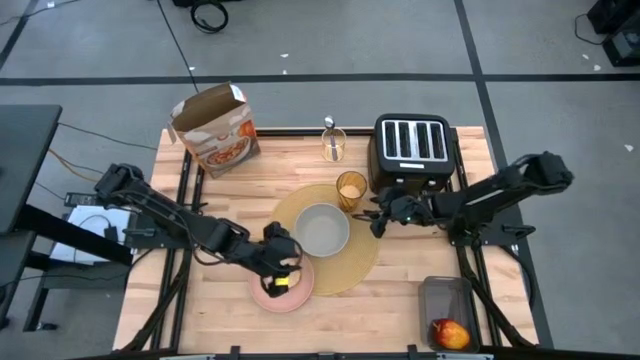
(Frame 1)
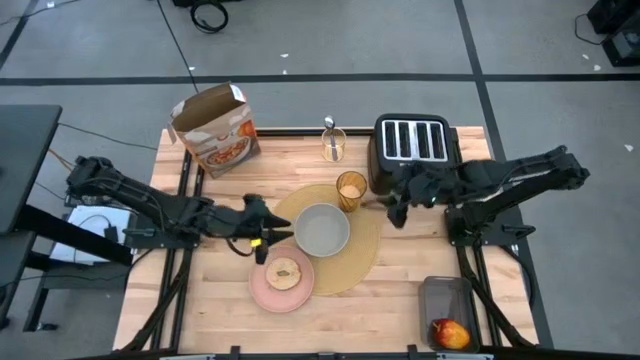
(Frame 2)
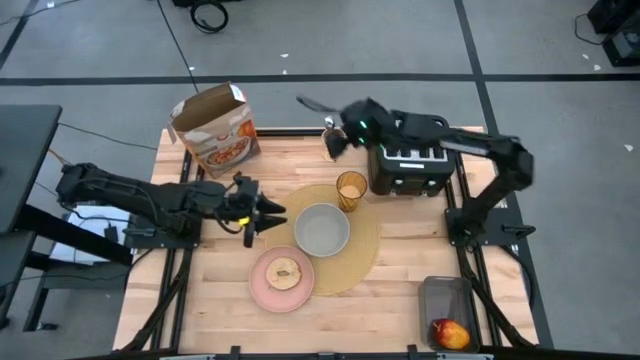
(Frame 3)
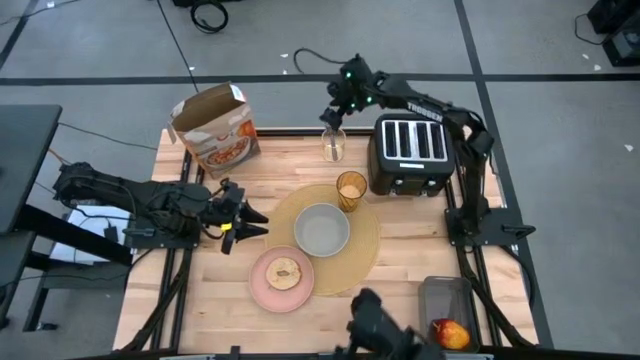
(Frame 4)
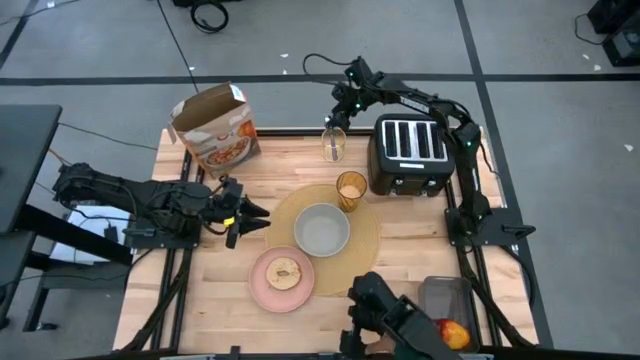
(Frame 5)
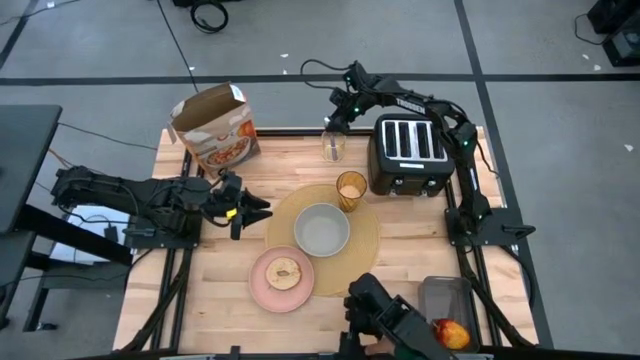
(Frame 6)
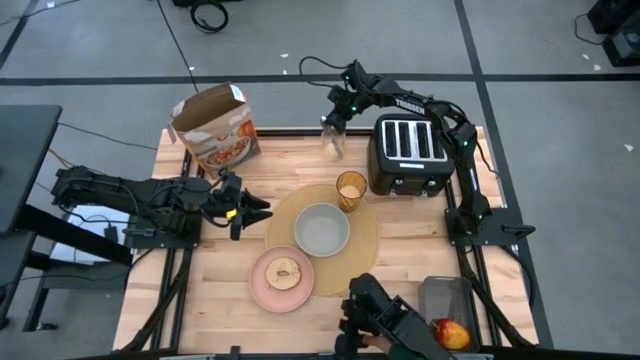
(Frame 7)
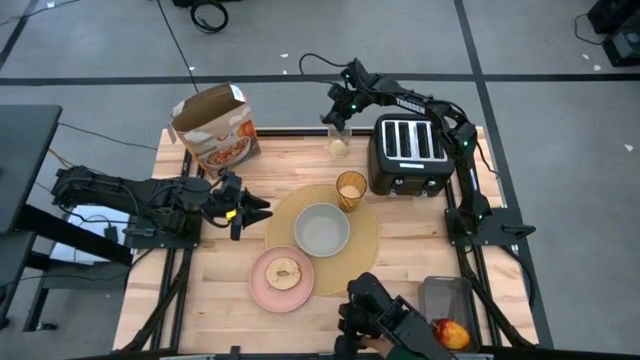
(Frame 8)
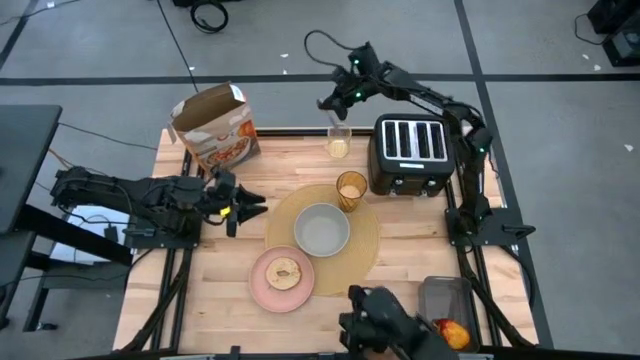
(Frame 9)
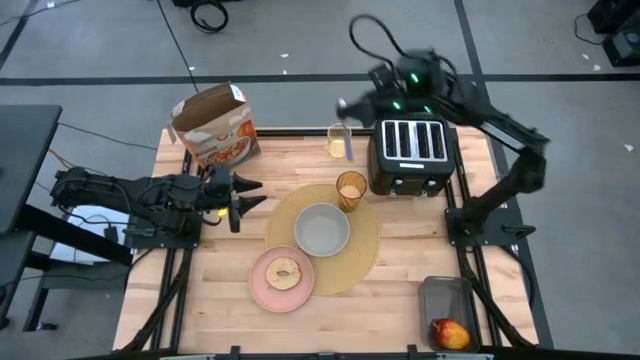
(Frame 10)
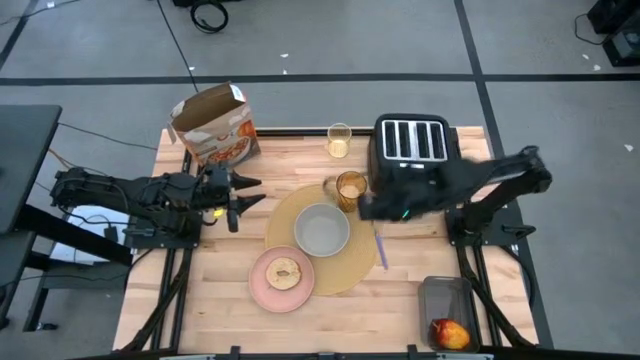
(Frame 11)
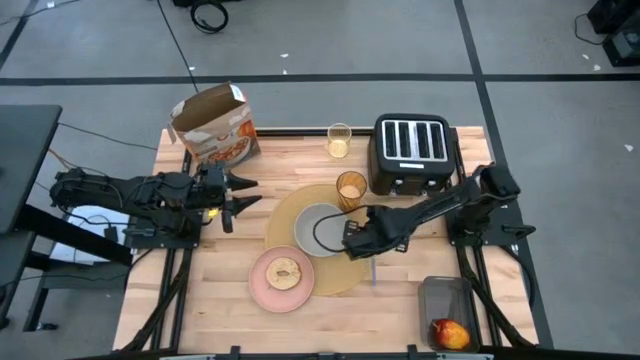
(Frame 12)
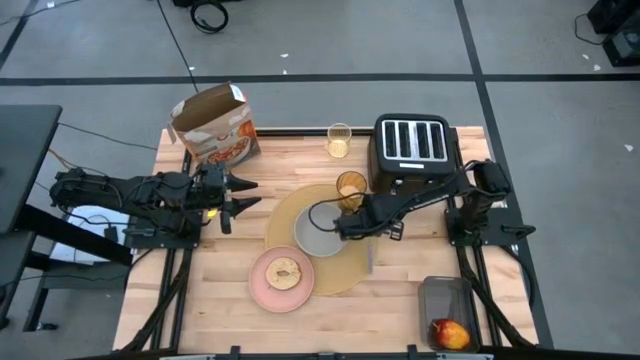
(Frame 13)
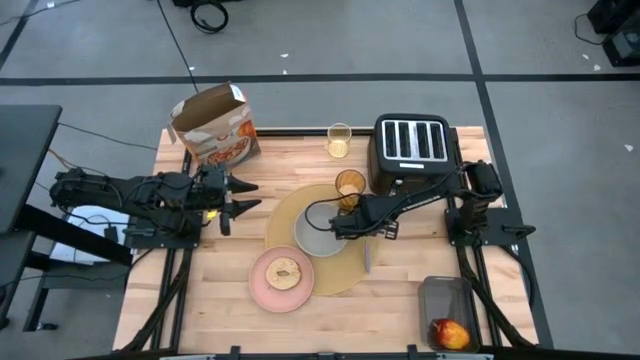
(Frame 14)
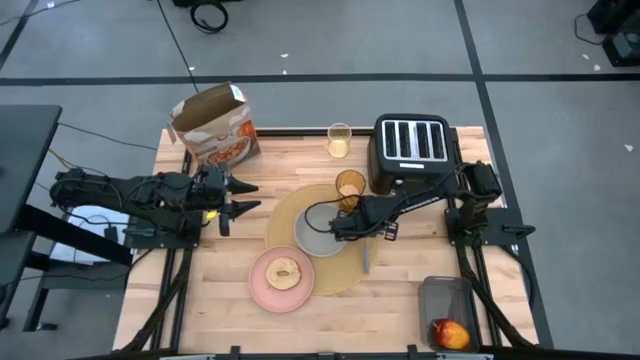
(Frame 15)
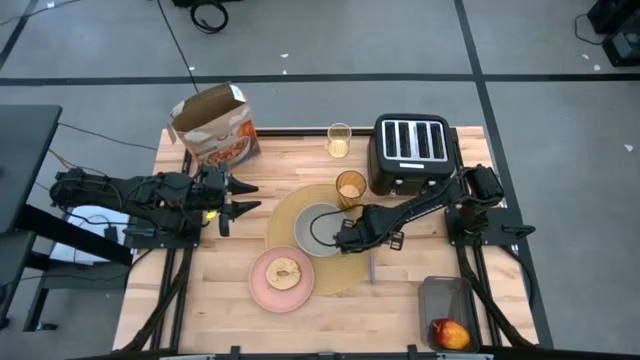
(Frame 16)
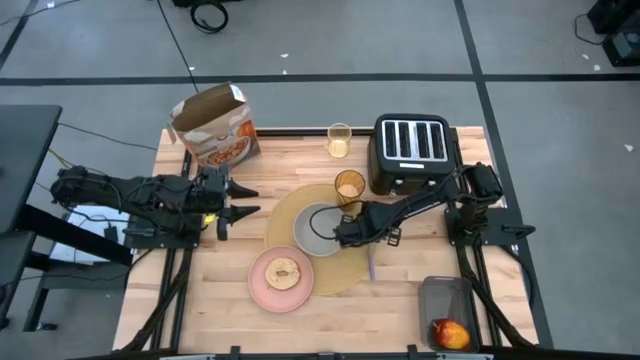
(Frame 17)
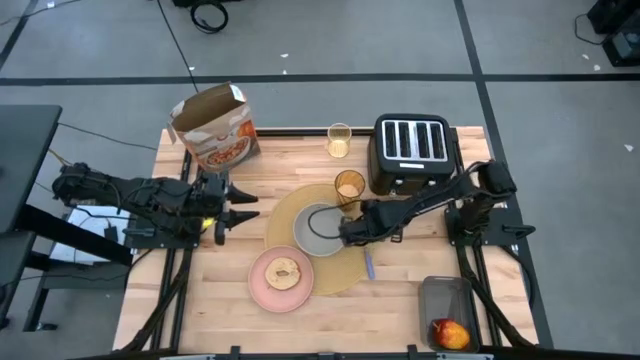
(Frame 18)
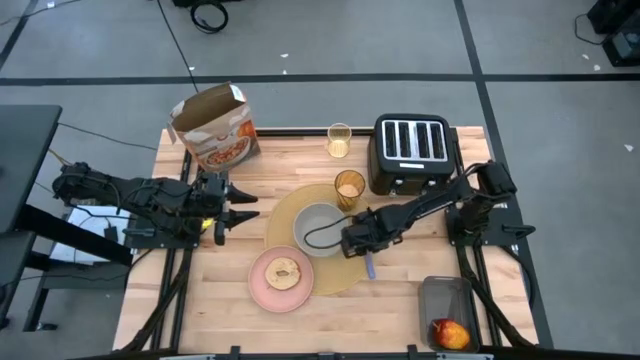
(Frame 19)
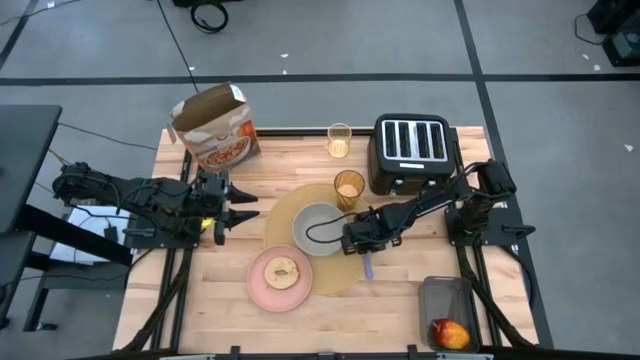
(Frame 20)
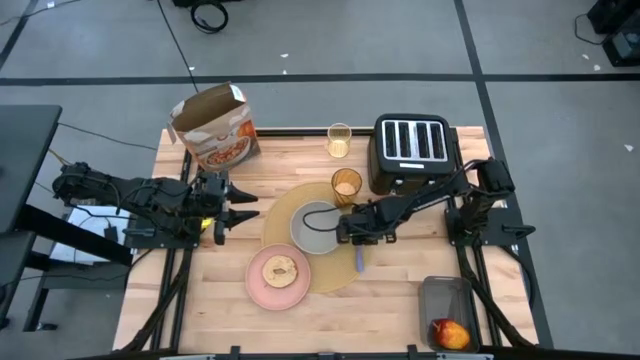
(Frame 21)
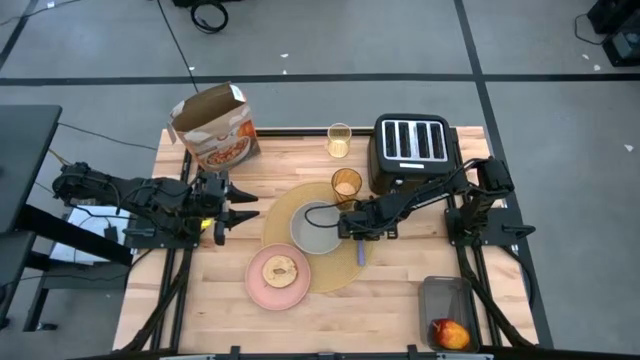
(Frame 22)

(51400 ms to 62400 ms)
Task: Arrange a breakfast setting
Put the violet spoon on the right of the gray bowl

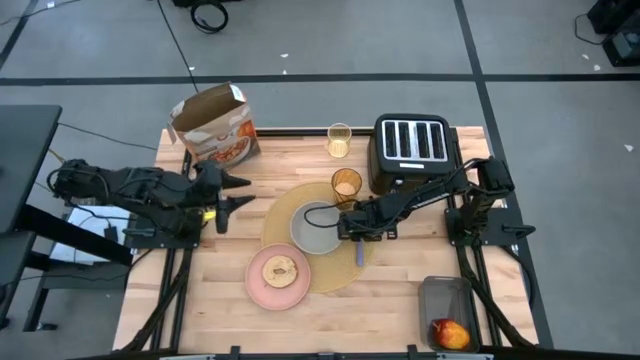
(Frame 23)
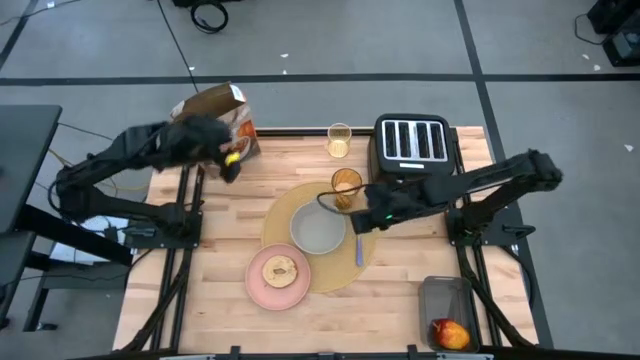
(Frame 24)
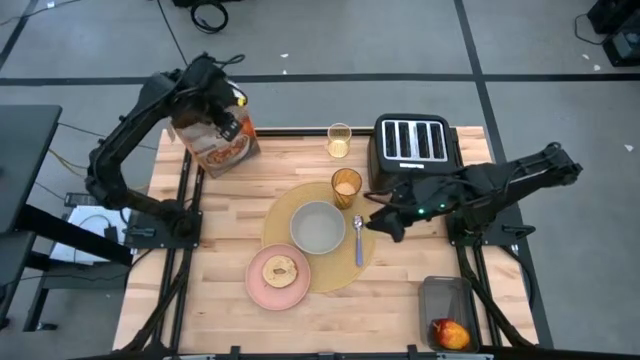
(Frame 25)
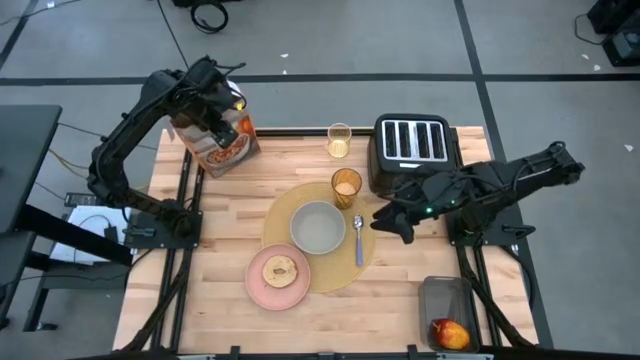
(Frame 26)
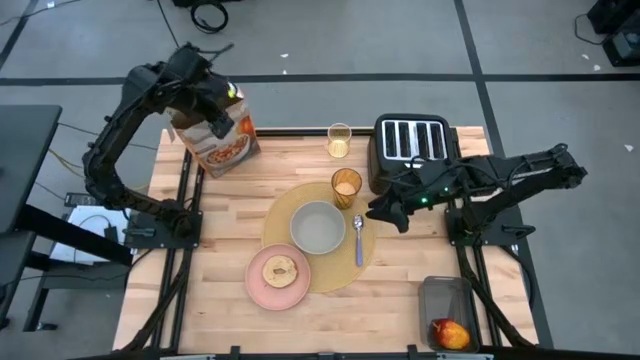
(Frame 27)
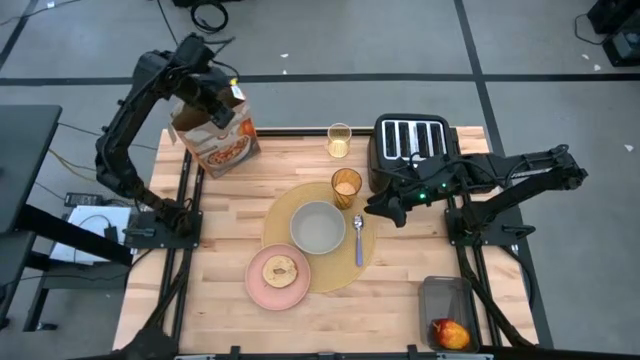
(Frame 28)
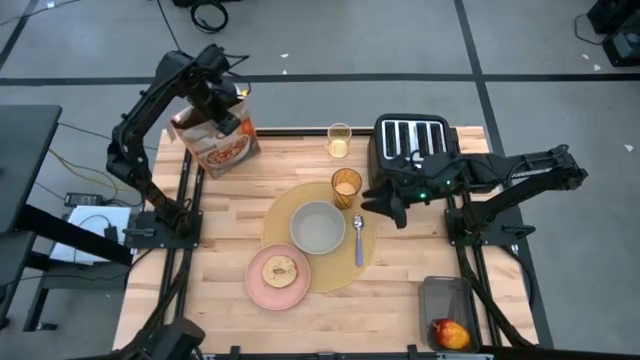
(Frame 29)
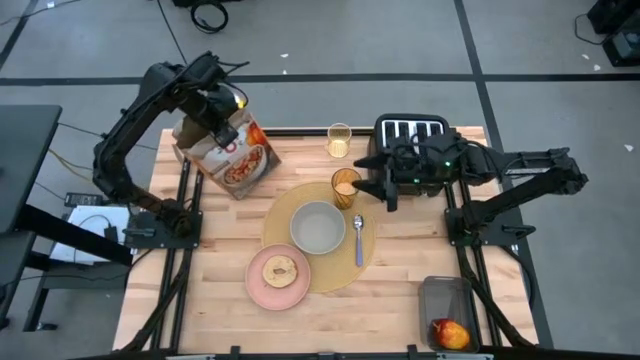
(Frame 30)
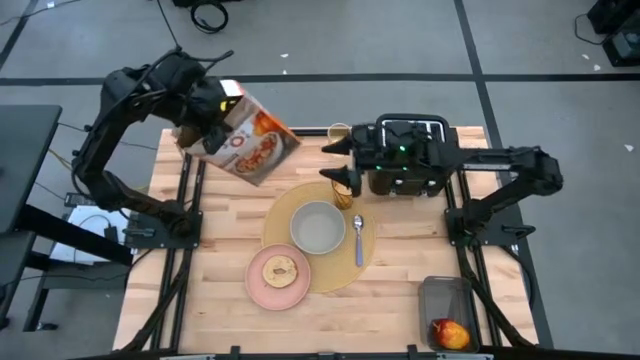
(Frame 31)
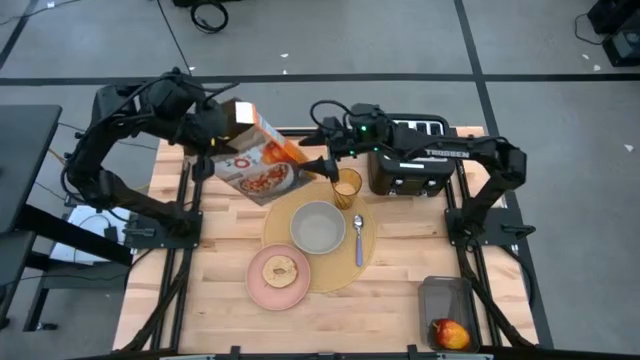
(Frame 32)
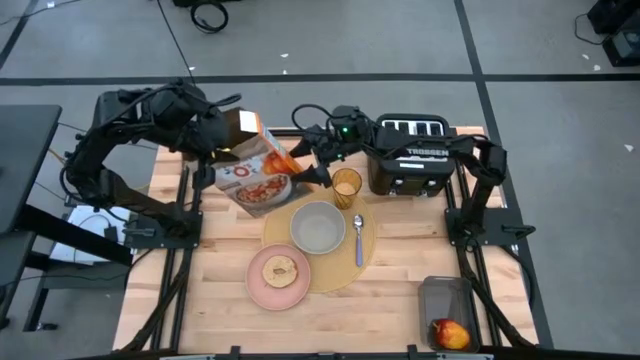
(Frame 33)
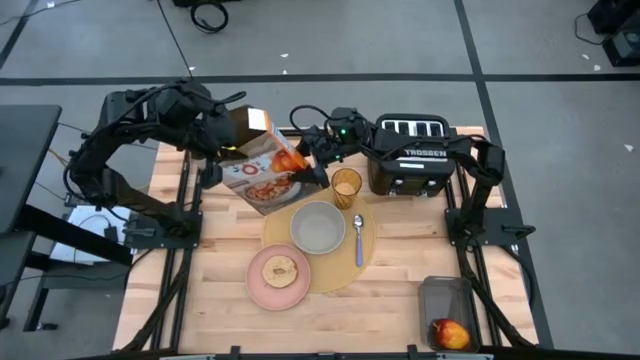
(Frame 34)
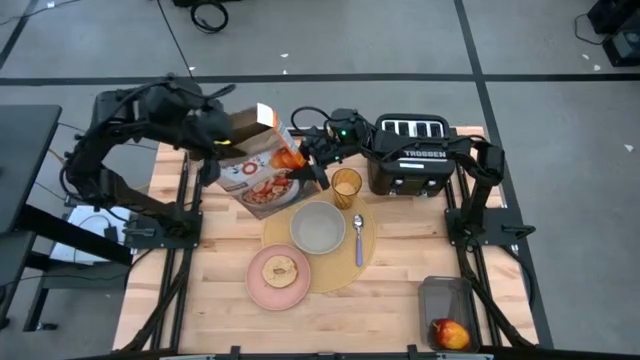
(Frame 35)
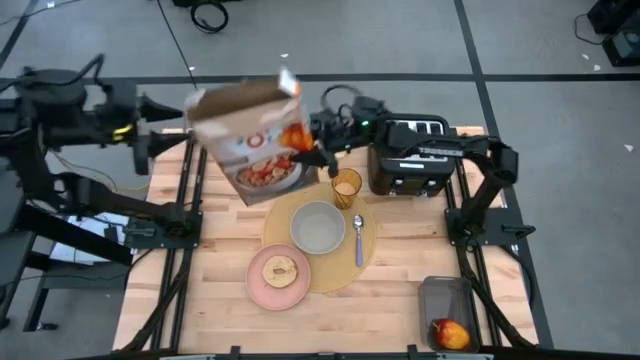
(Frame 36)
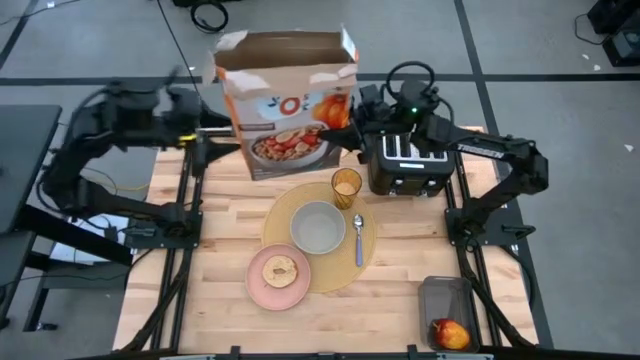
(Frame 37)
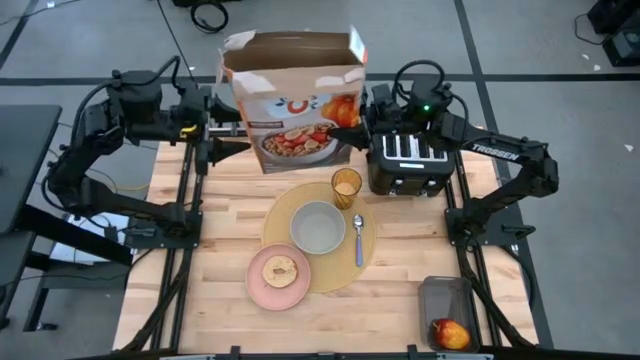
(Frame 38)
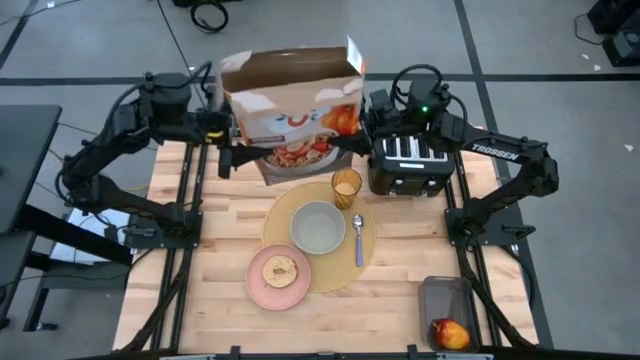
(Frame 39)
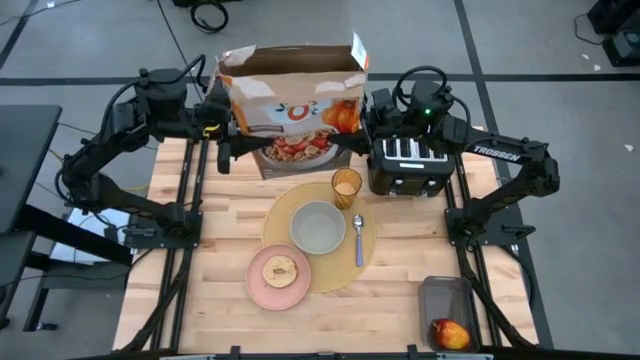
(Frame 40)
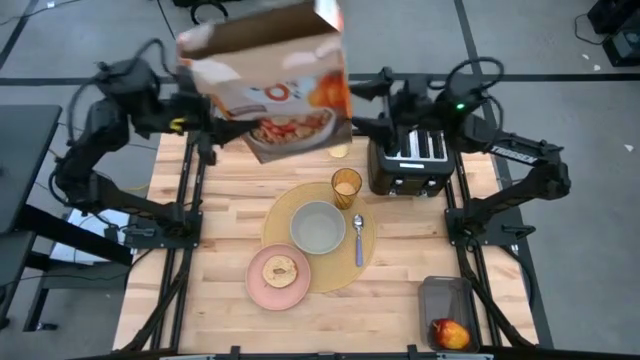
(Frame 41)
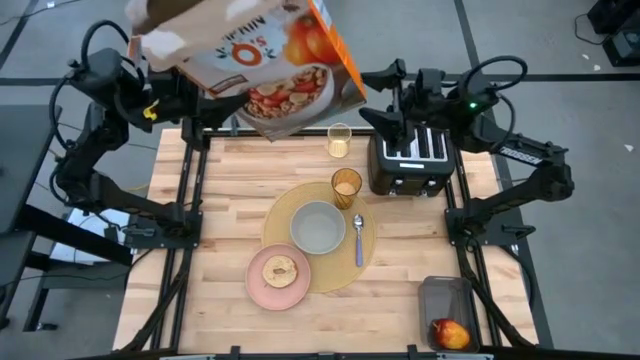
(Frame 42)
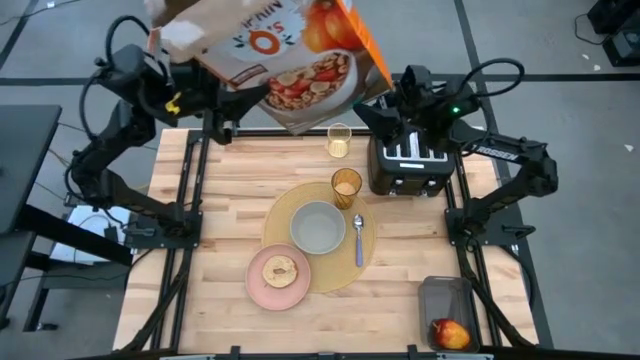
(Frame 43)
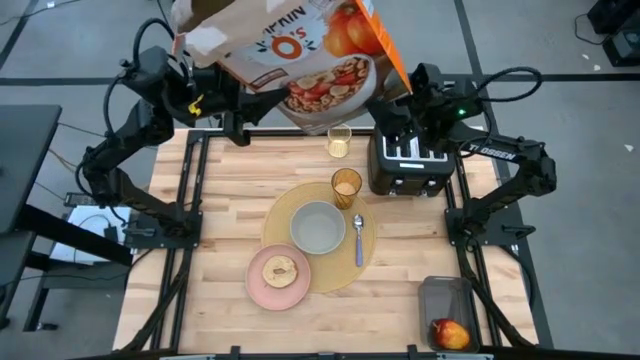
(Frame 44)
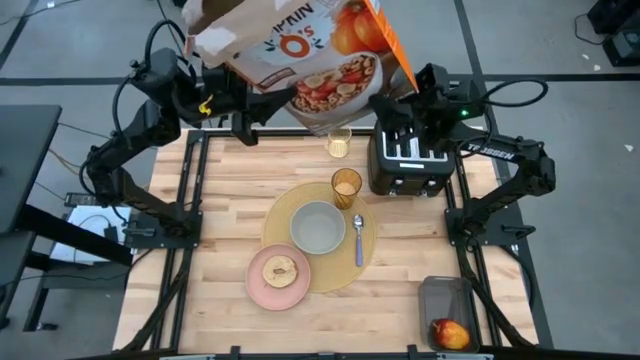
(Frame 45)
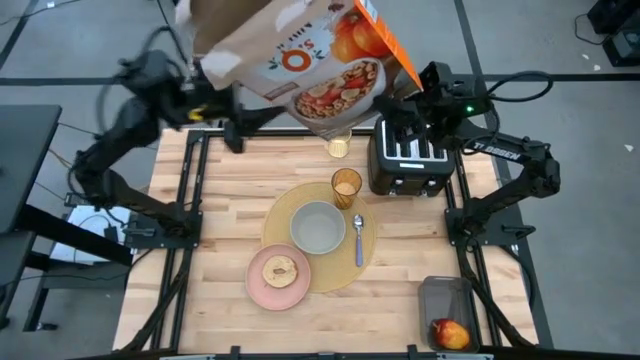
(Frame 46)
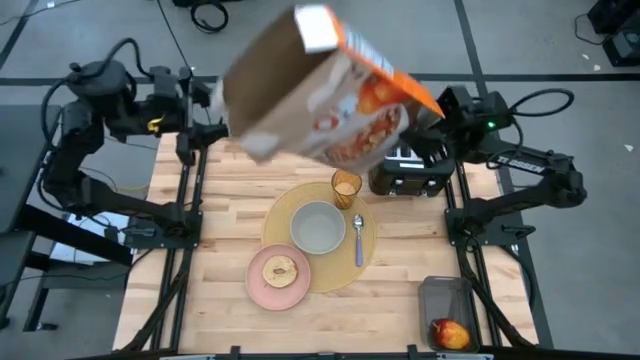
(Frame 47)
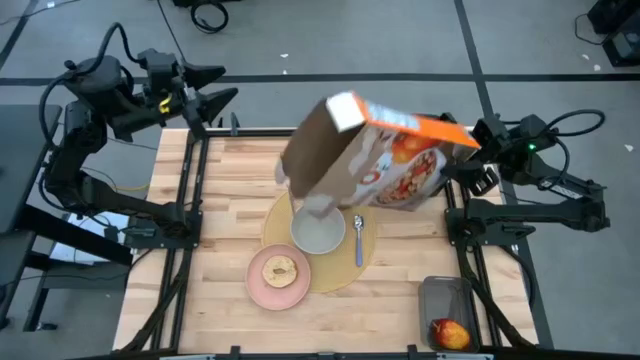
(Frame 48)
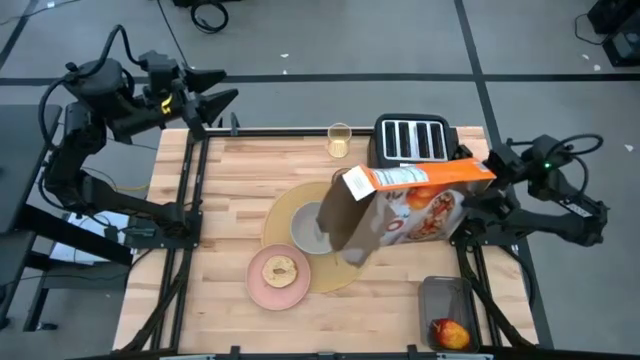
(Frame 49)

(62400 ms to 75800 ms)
Pour the cereal on the gray bowl
